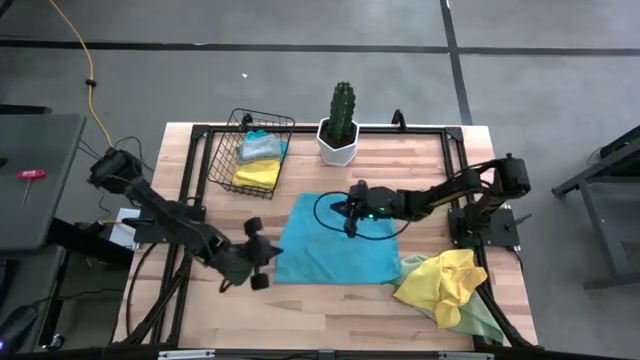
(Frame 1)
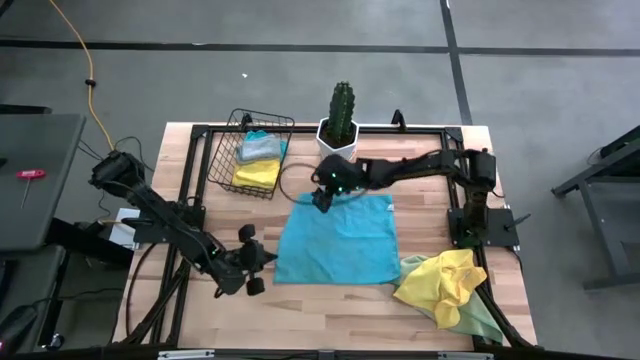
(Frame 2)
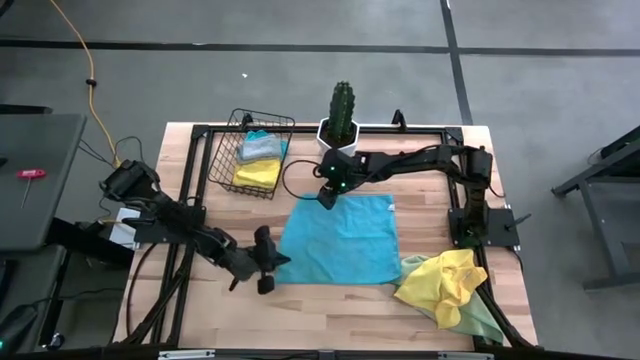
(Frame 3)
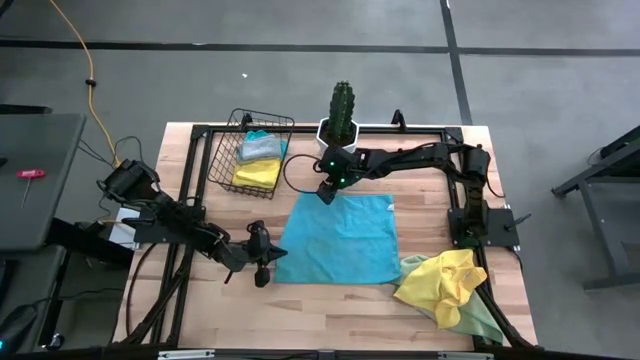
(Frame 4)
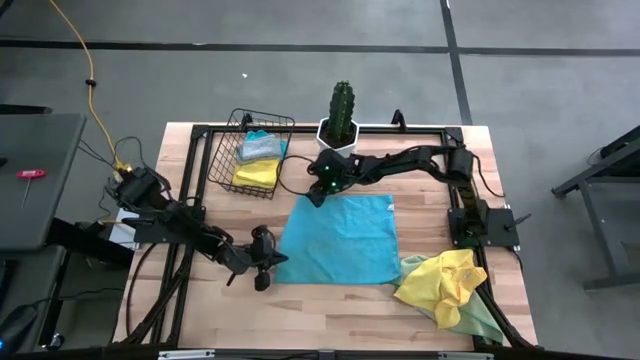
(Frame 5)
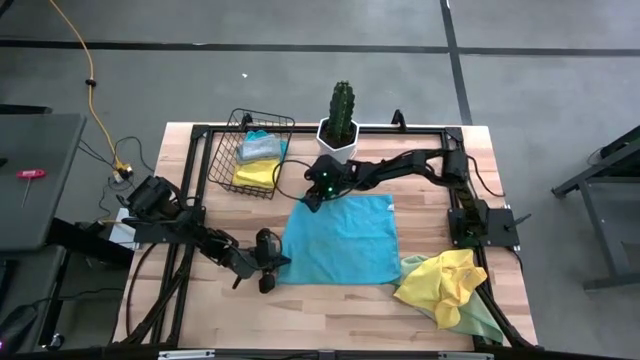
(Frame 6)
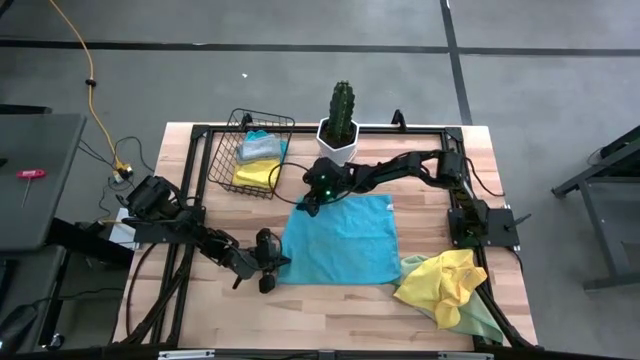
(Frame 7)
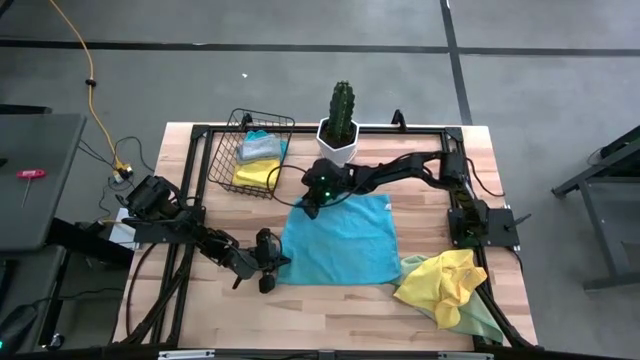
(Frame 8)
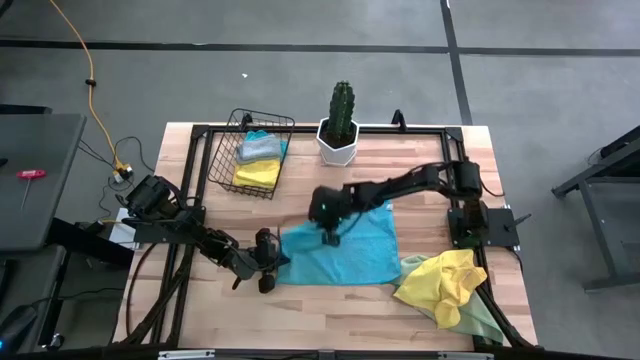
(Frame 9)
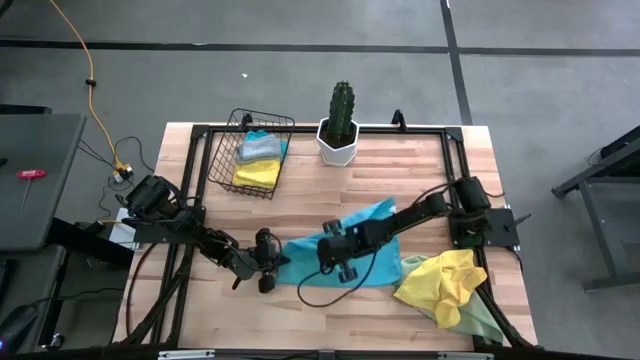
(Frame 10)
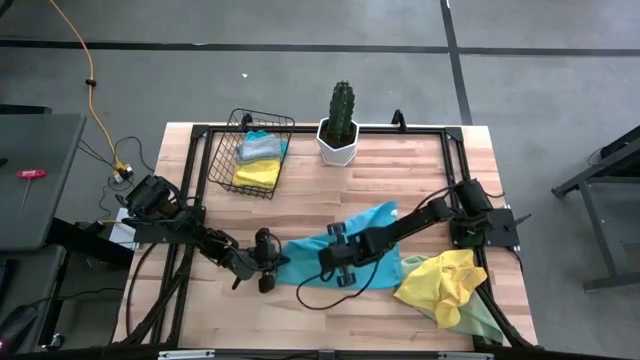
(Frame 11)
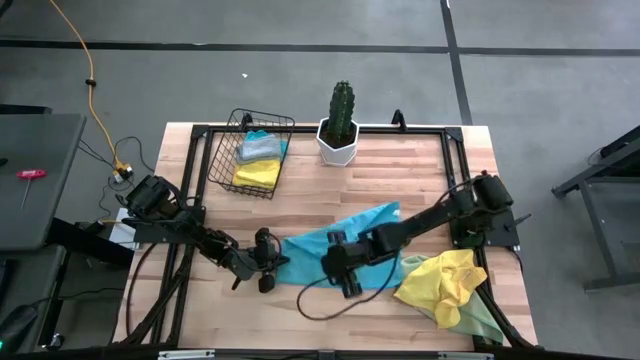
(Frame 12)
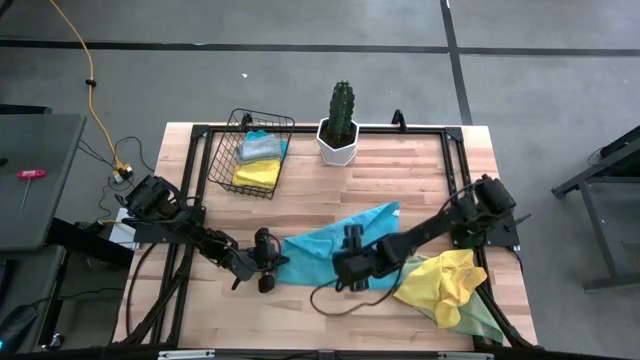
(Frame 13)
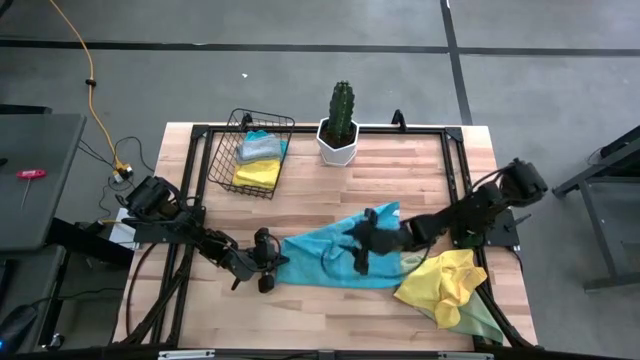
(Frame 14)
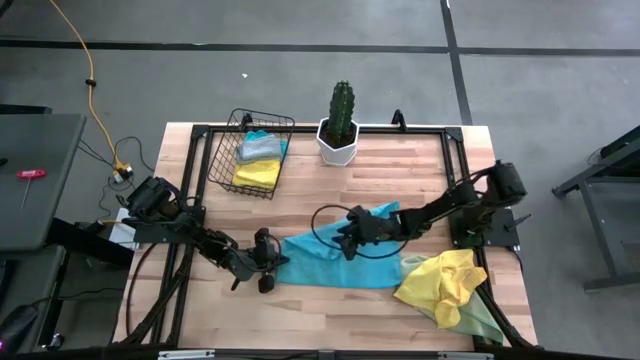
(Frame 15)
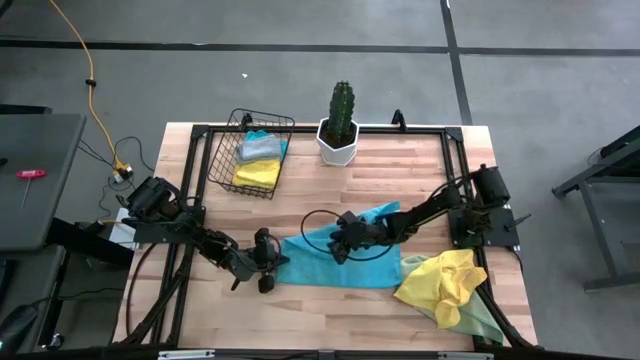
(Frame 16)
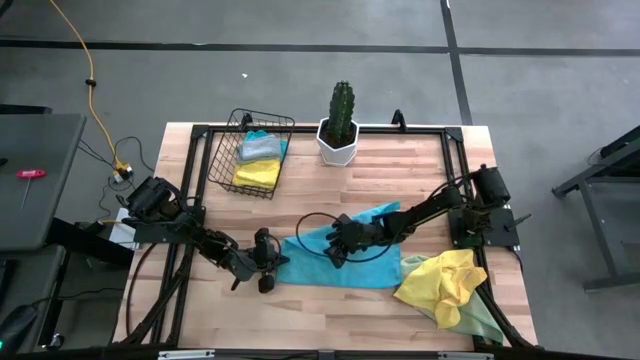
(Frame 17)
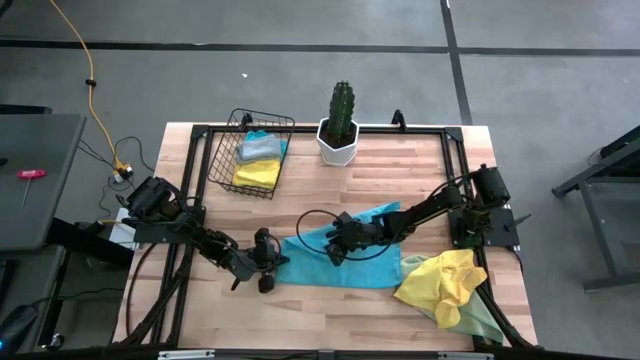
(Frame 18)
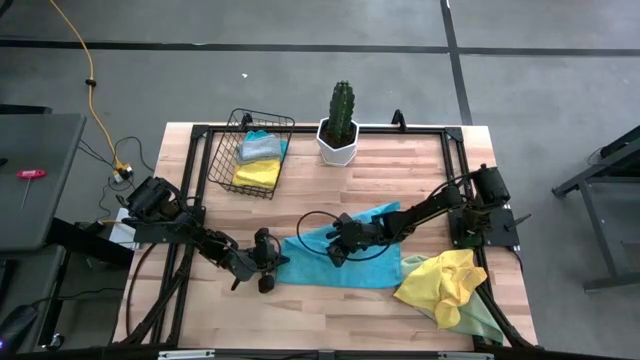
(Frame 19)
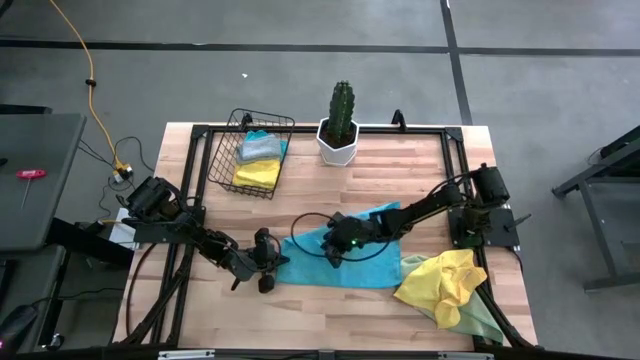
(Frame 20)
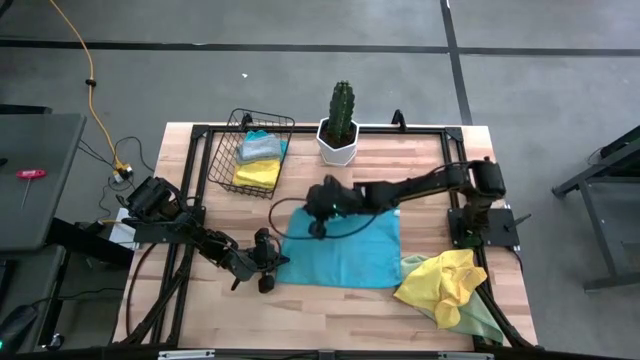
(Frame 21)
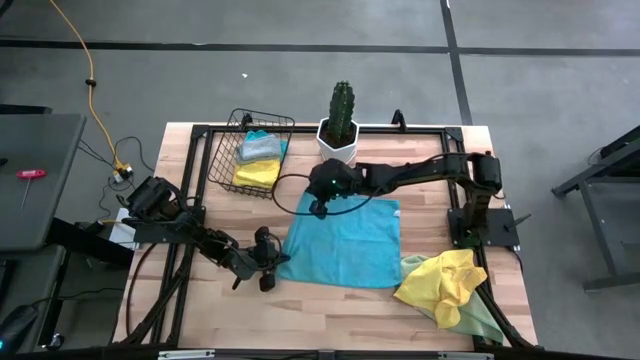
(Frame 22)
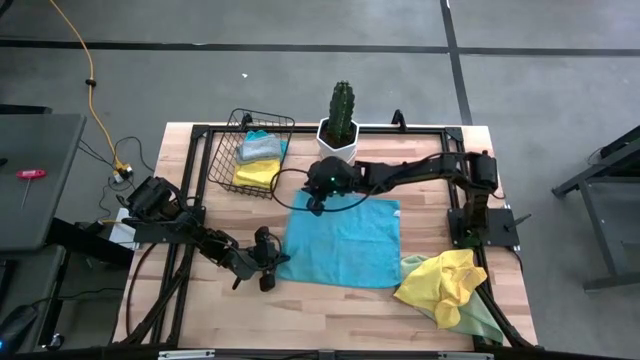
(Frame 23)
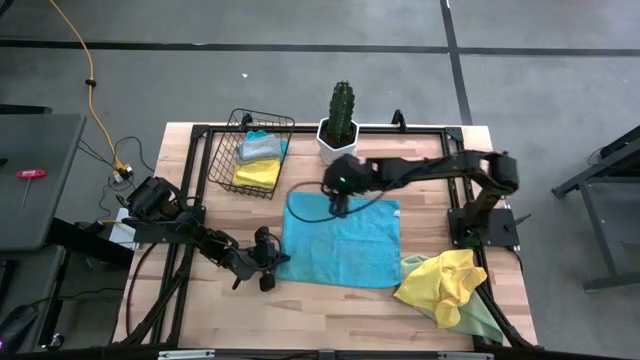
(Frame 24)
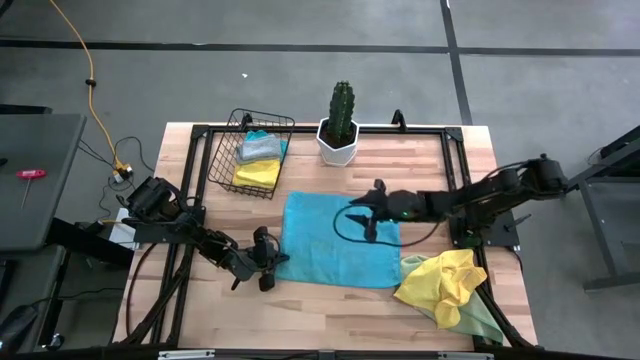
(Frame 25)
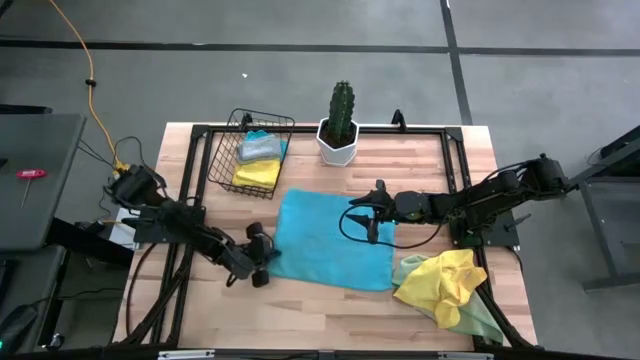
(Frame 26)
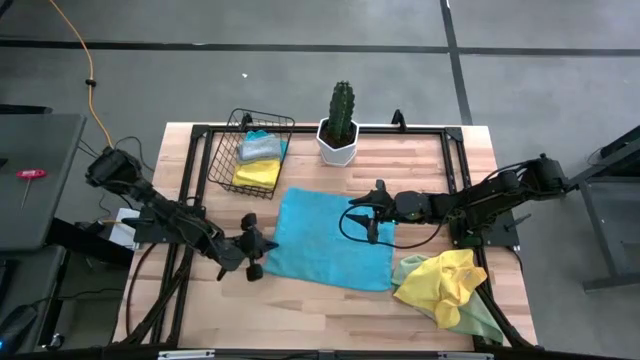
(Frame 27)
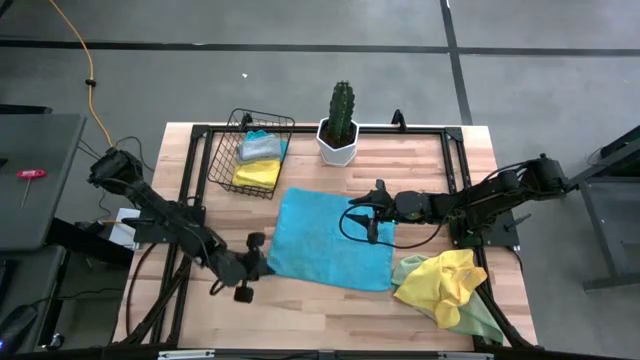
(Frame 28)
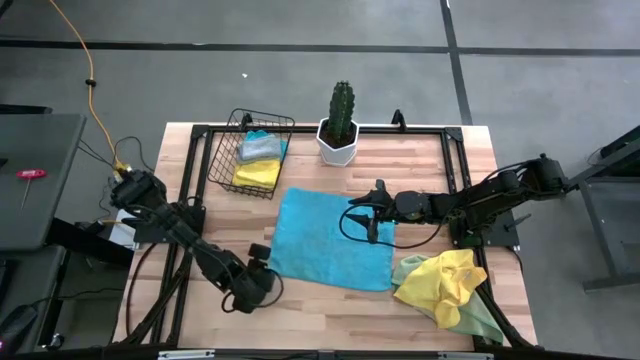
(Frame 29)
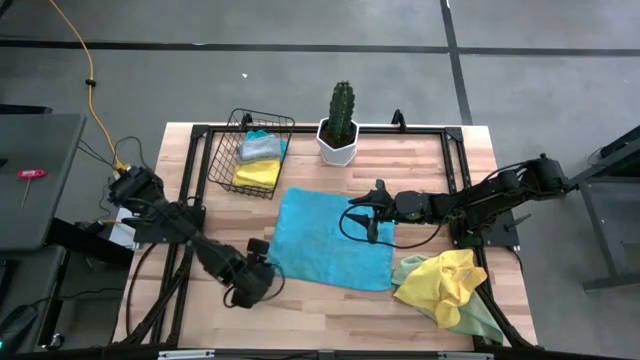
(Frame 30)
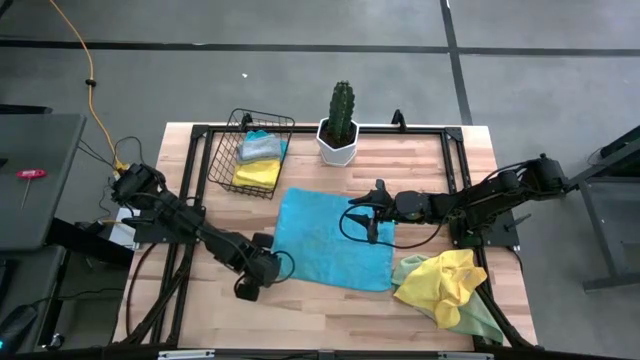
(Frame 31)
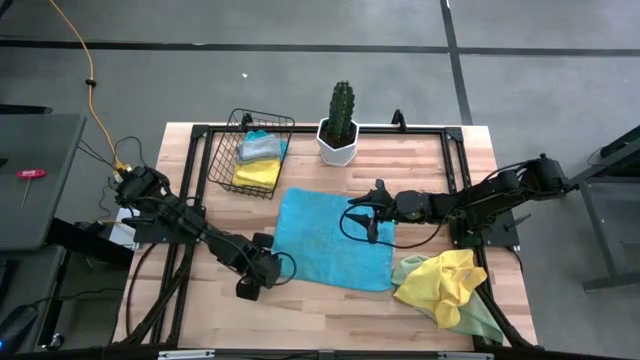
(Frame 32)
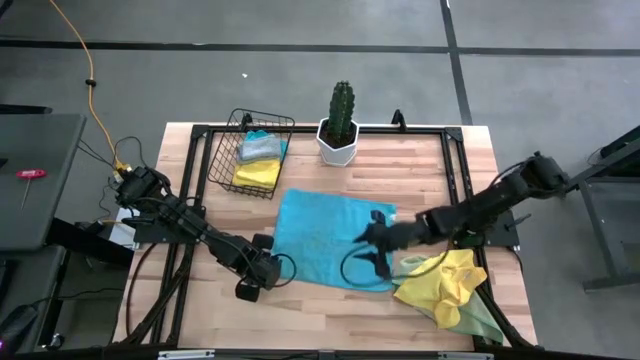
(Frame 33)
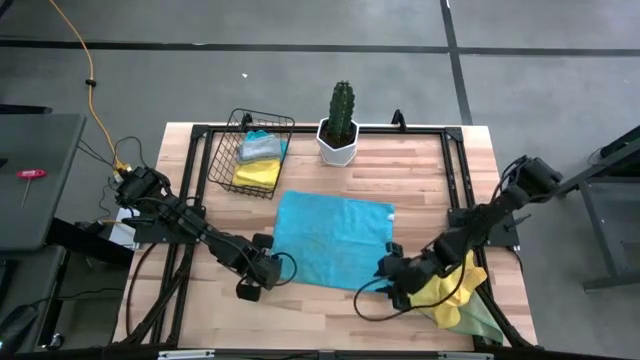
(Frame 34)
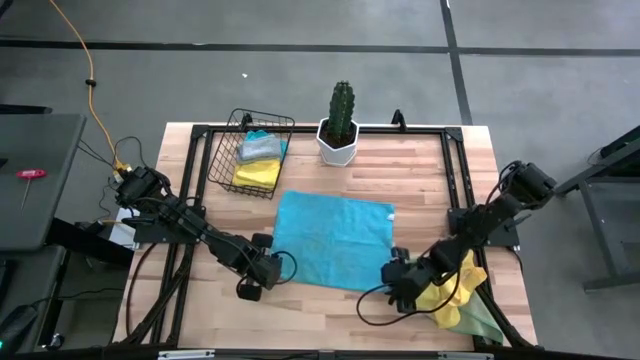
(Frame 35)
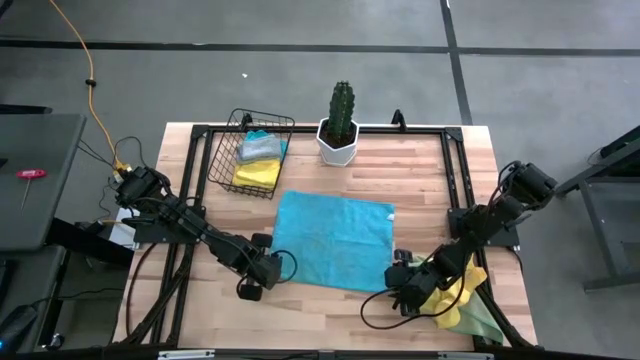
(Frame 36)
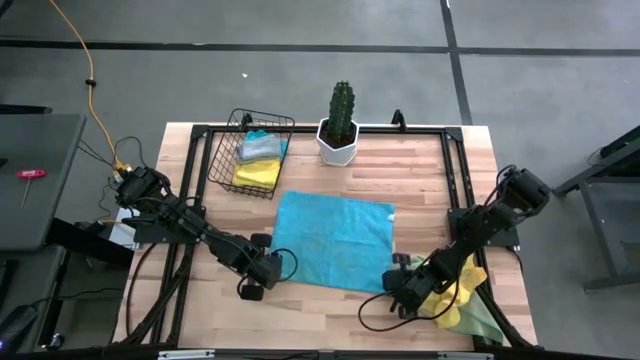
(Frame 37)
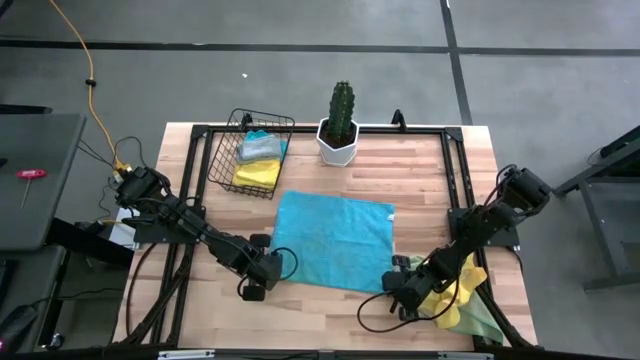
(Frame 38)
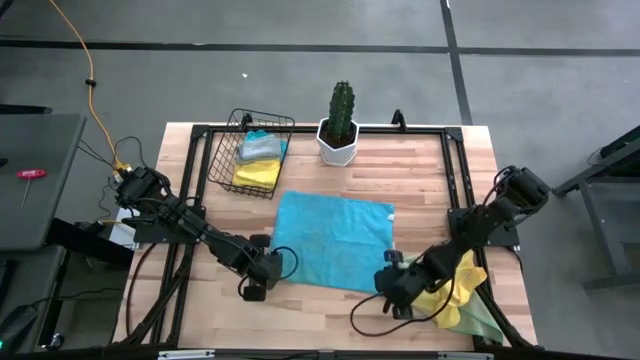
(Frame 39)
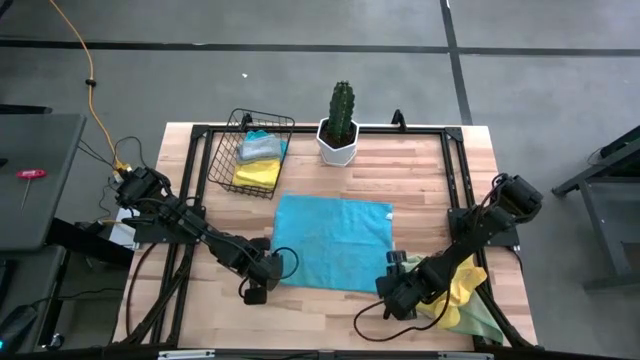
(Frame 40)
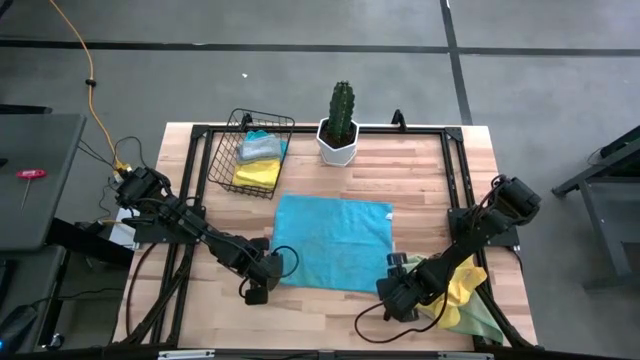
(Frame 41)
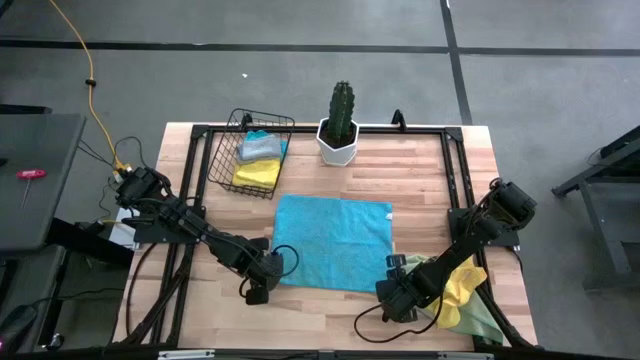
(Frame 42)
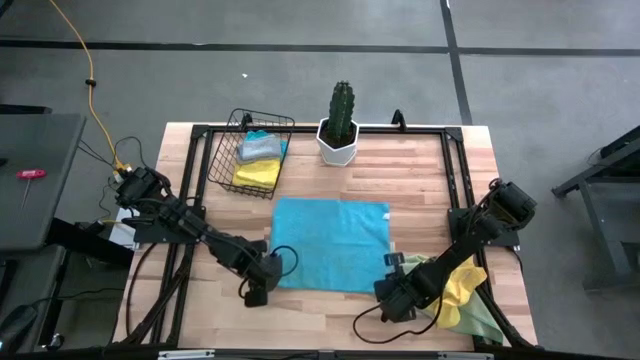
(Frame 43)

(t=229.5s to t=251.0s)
Task: Fold microfiber towels
Fold the blue microfiber towel on the table
